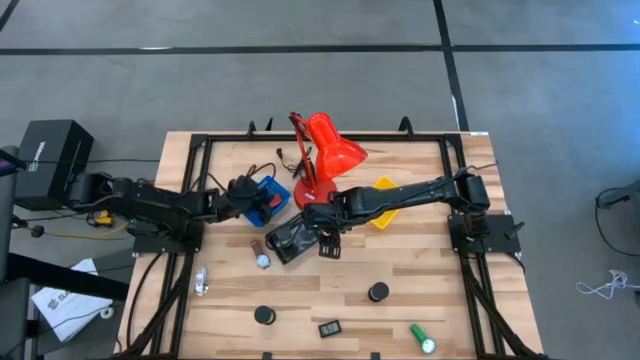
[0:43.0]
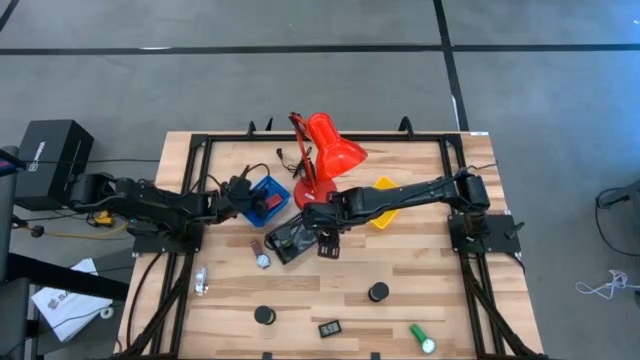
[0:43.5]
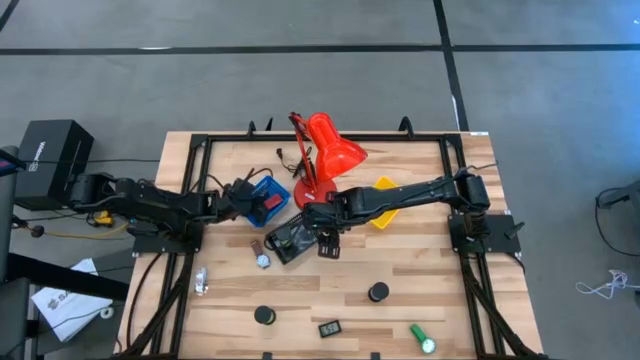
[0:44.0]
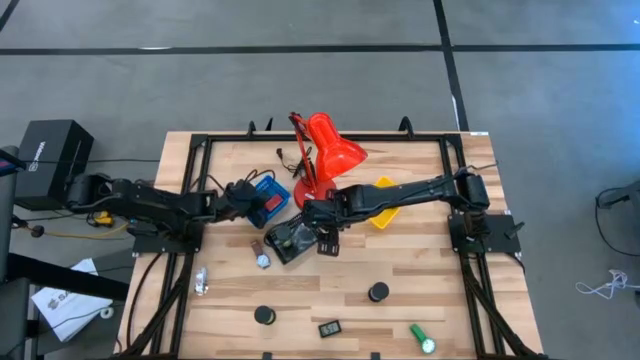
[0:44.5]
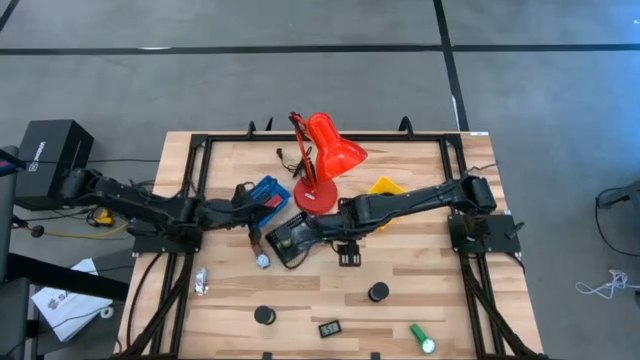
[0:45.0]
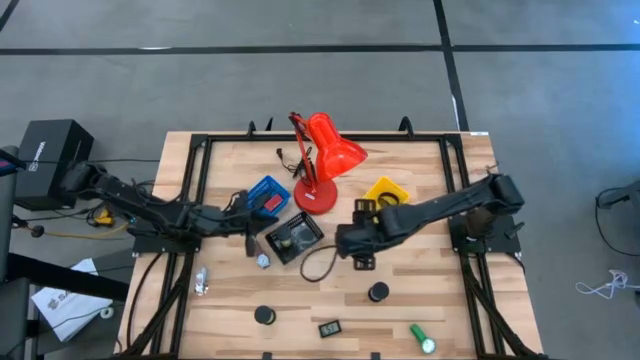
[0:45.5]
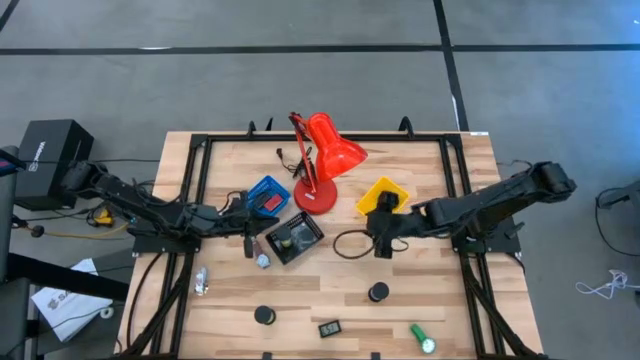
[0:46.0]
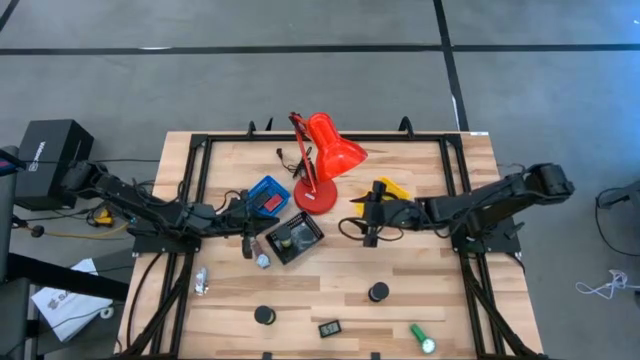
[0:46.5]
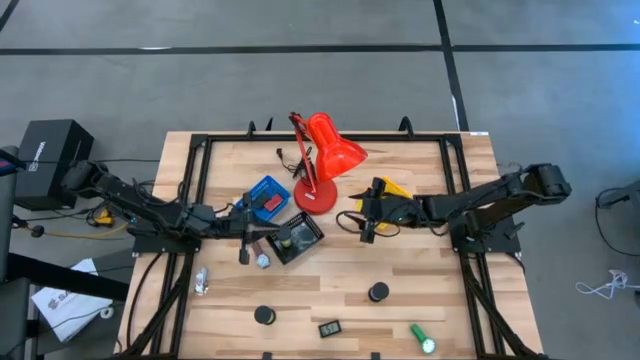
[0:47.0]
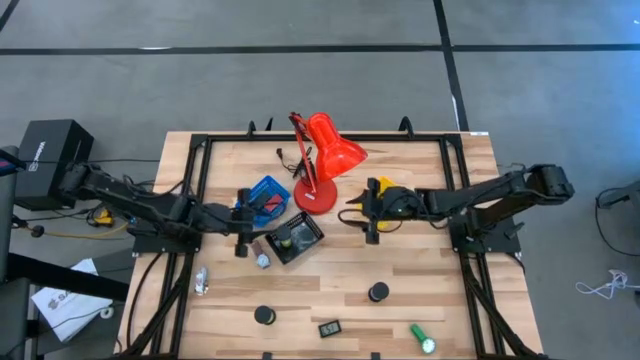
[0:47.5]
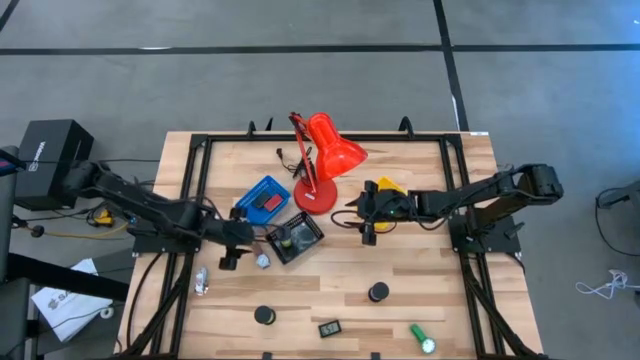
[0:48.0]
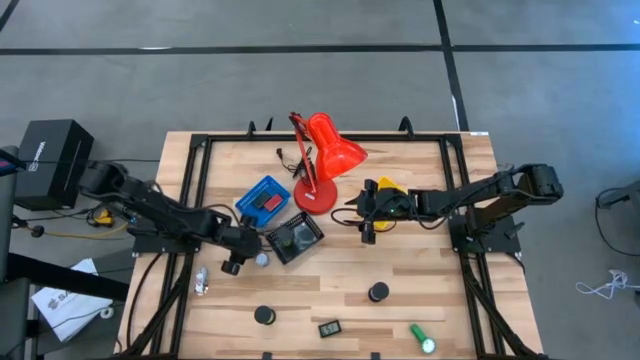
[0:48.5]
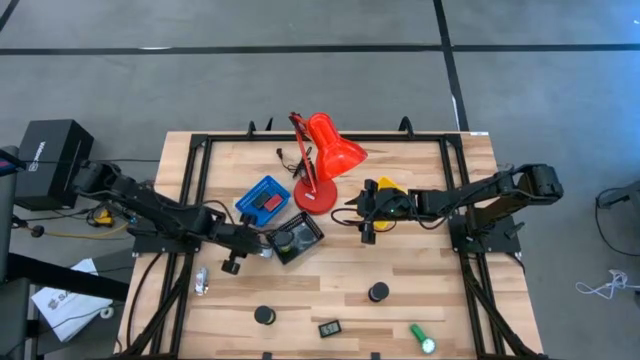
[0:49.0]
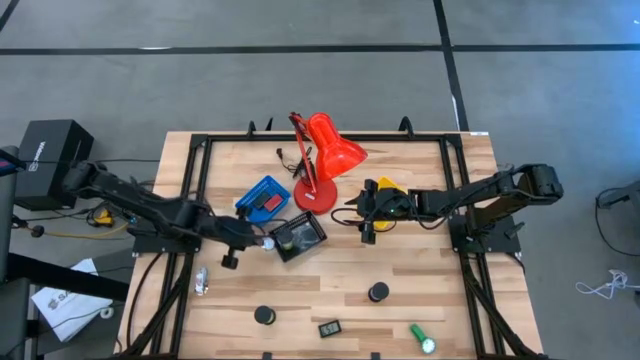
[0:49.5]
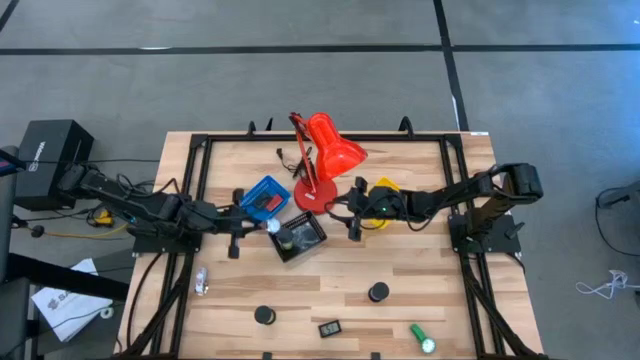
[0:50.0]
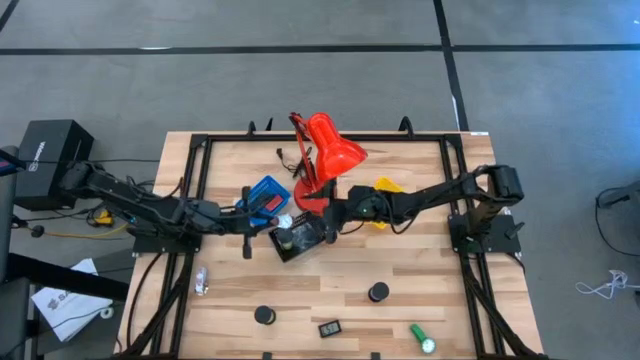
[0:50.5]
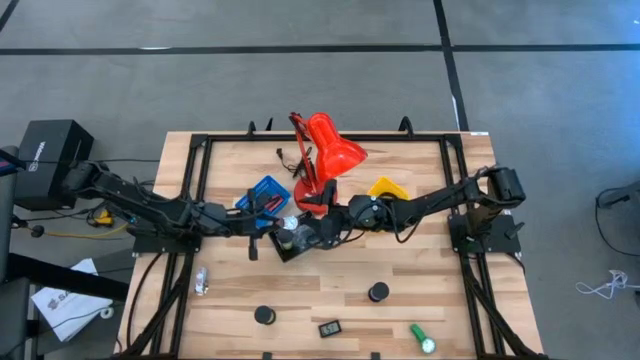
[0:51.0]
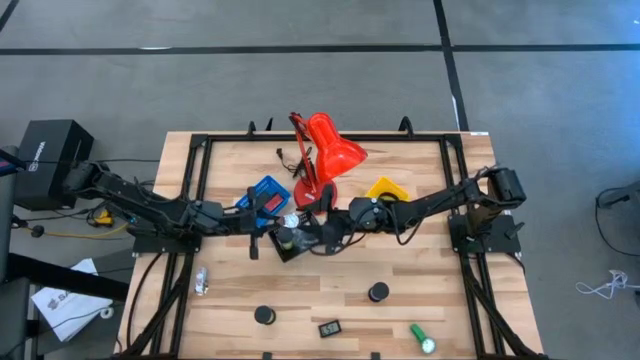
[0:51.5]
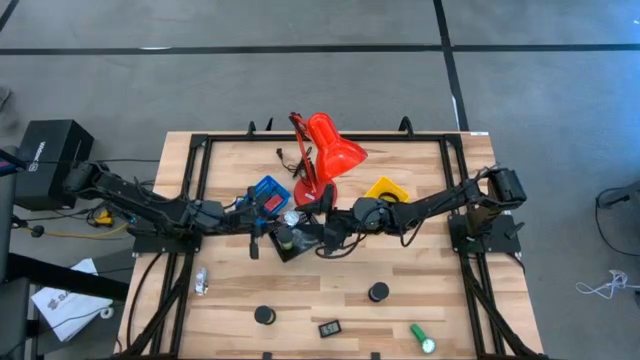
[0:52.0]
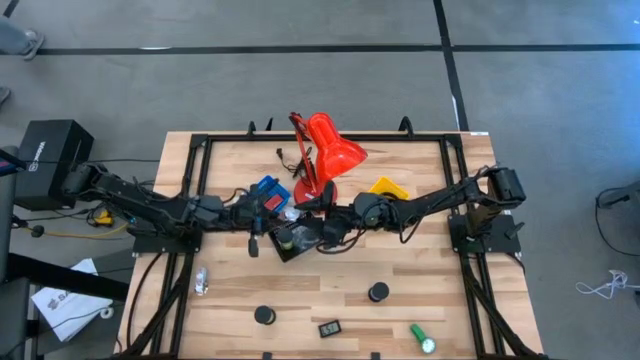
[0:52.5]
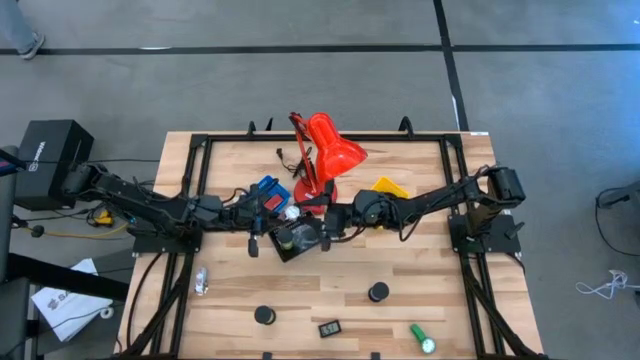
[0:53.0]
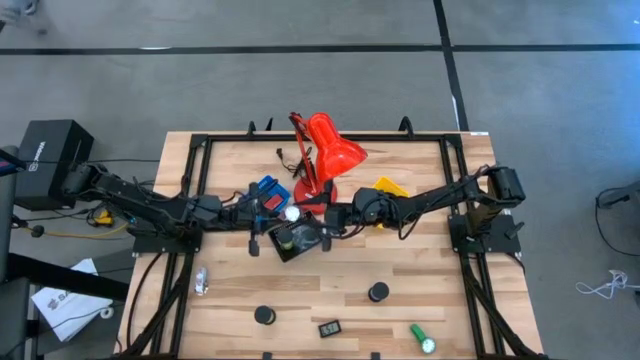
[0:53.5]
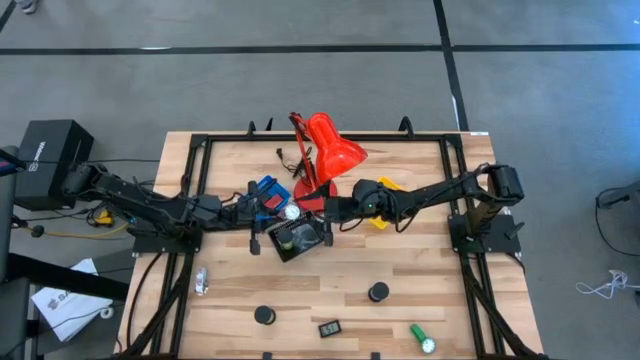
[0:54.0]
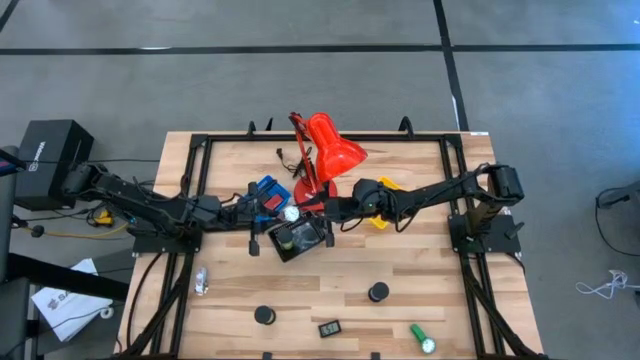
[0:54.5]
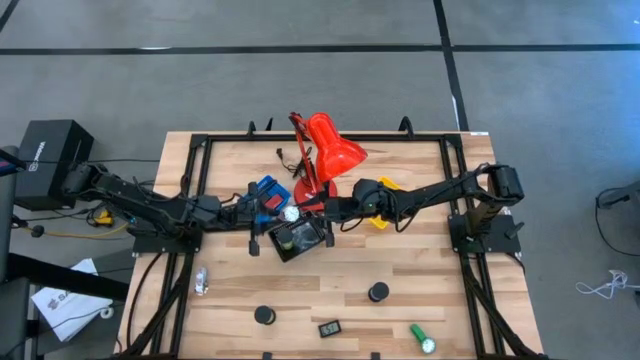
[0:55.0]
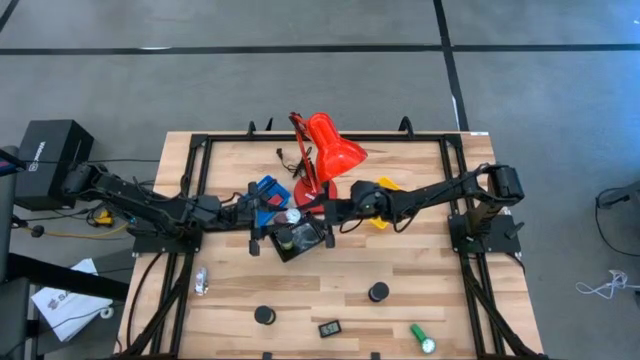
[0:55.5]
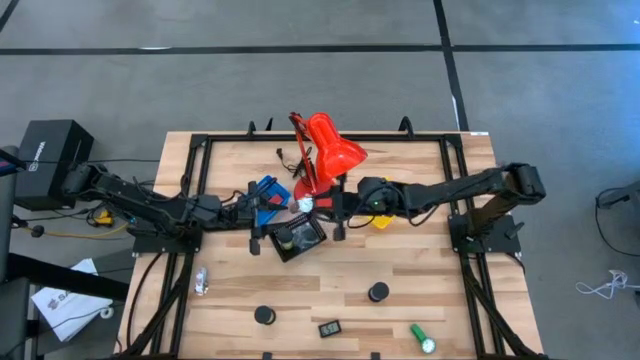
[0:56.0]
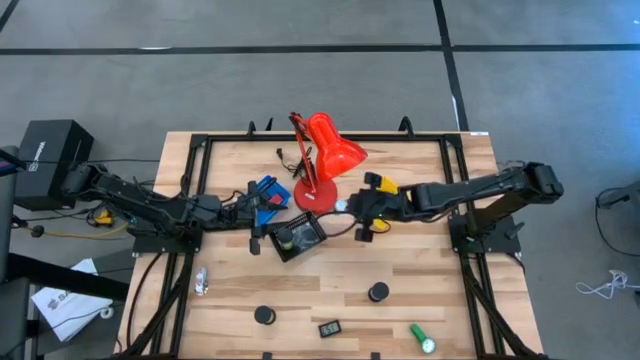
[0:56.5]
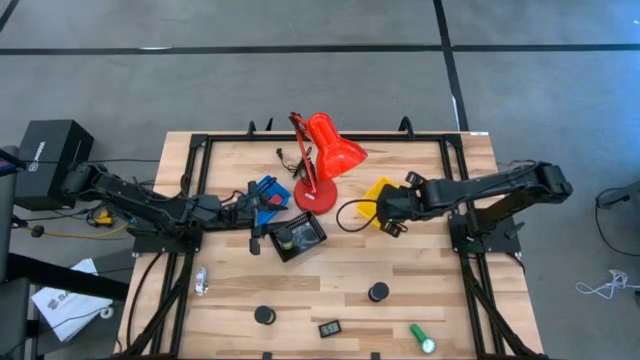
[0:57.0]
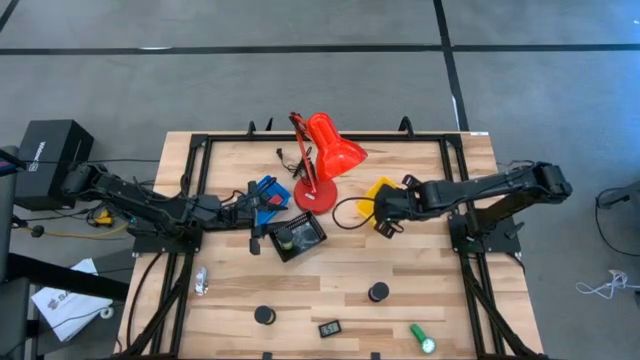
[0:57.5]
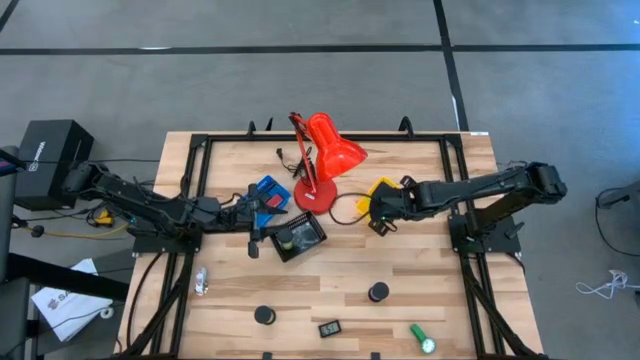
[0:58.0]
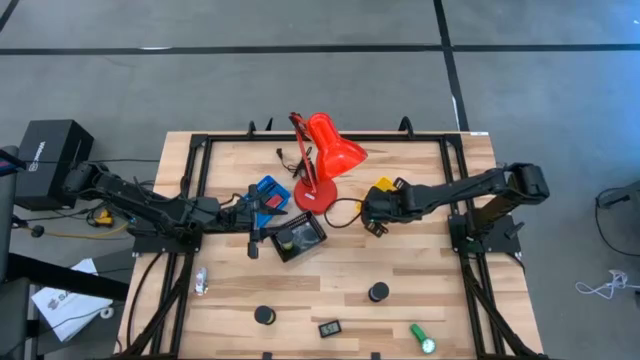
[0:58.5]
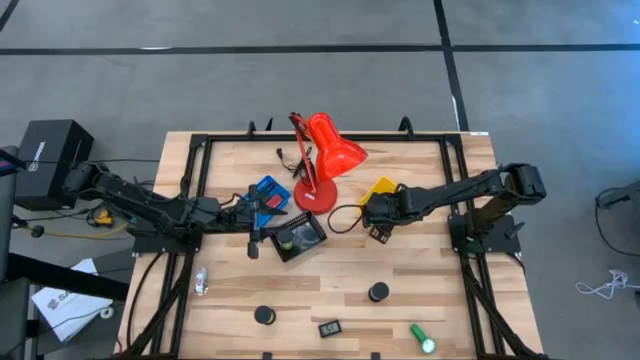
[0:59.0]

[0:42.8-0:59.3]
Task: Pick & Place Office items
Put the brown watch into the yellow bin

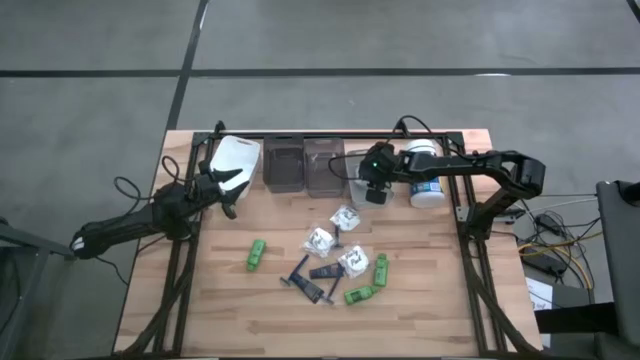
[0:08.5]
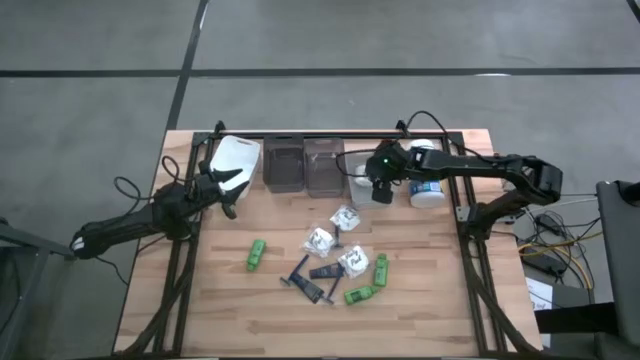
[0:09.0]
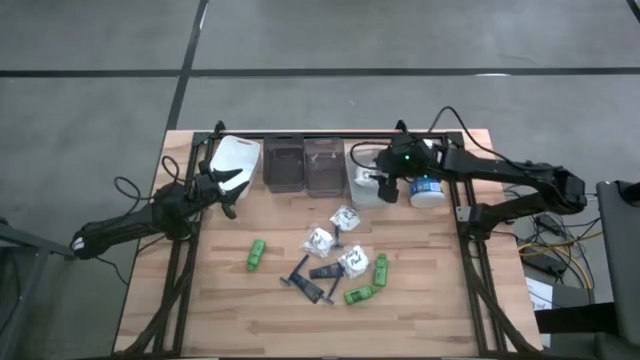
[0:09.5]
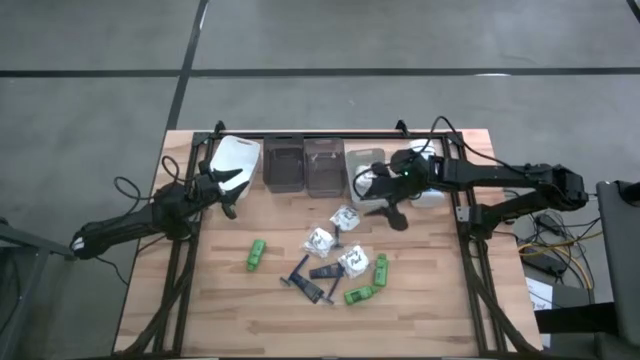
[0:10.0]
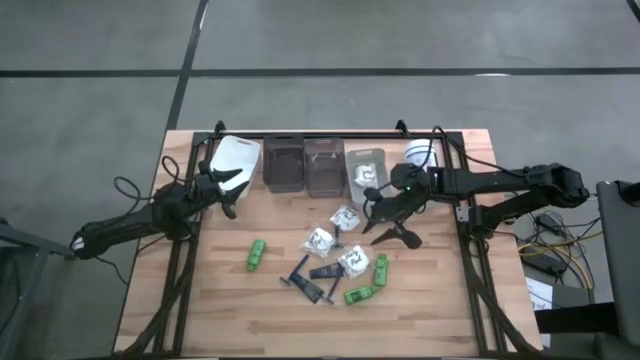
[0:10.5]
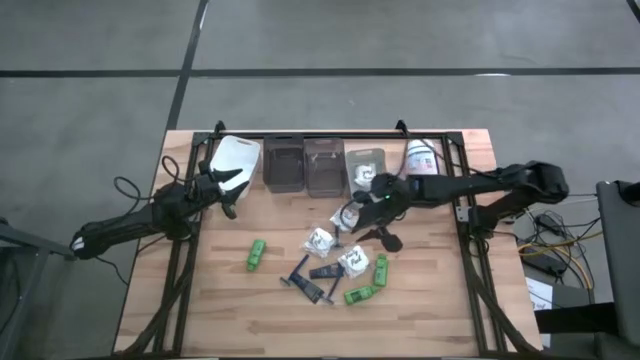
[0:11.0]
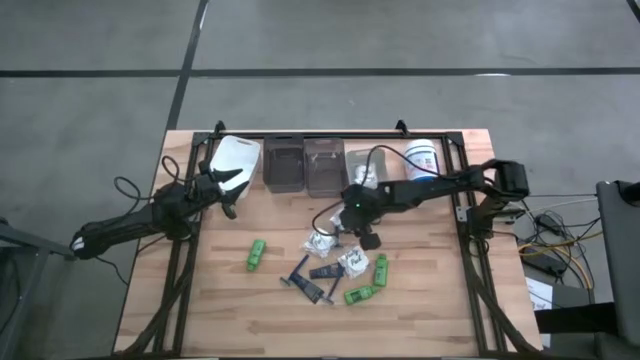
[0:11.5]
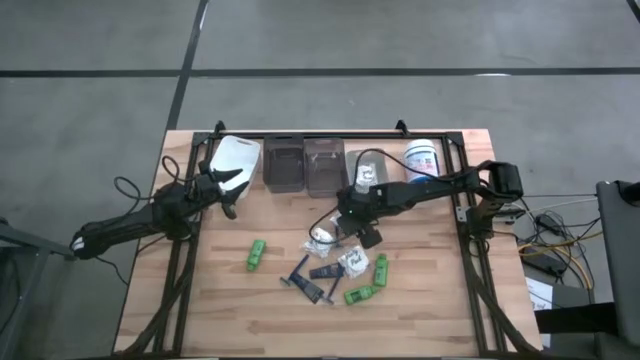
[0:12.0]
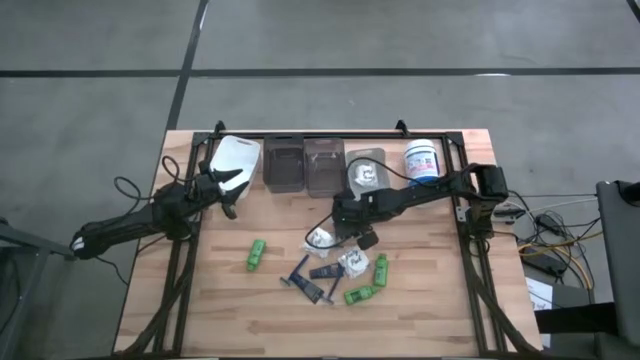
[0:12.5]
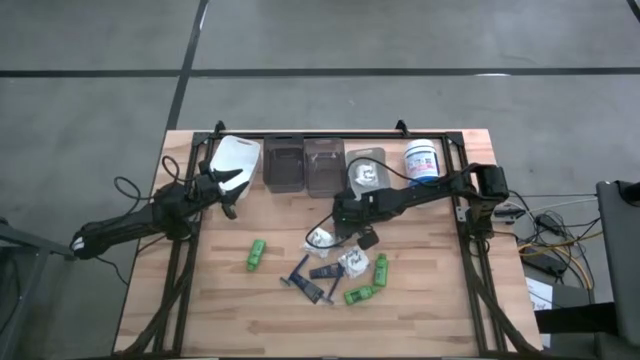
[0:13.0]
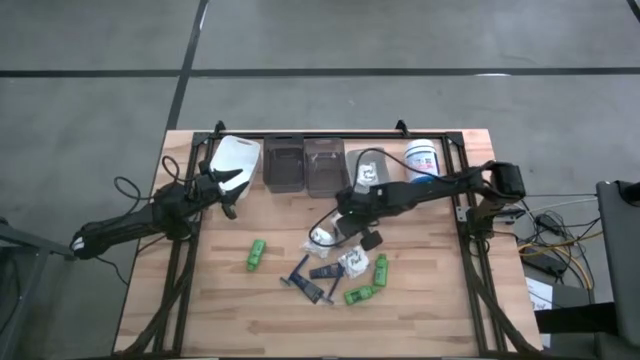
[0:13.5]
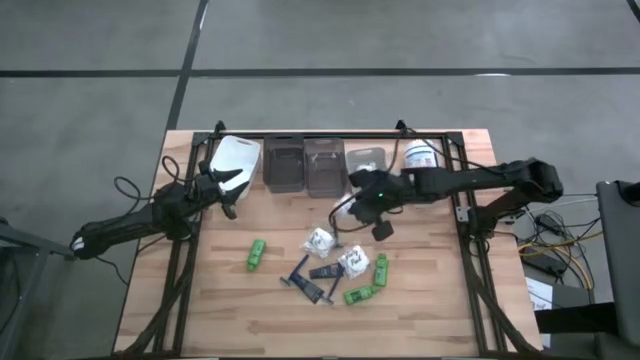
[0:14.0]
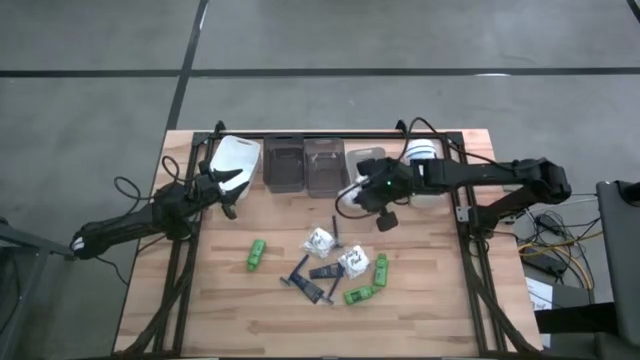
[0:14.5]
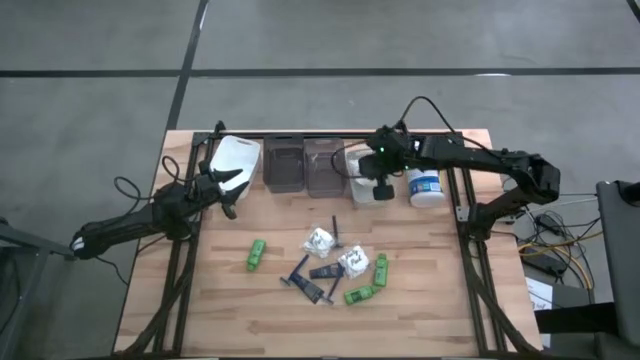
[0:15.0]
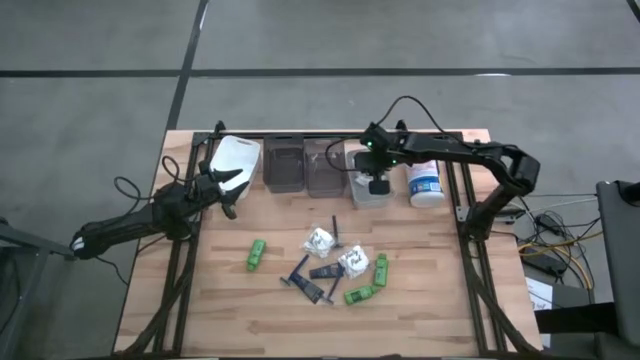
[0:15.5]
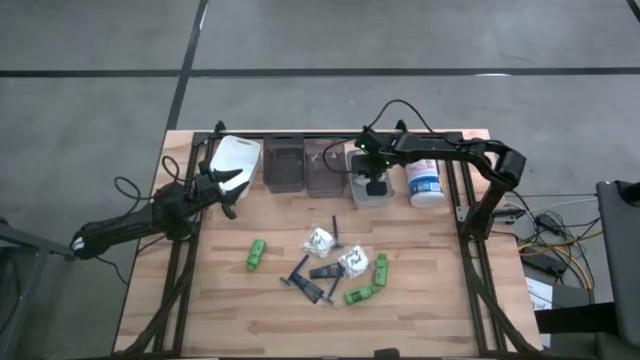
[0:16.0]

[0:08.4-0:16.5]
Task: Pick & Place Travel size toiletries
Put the top cotton pack into the grey bin
